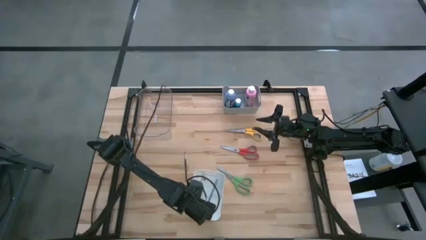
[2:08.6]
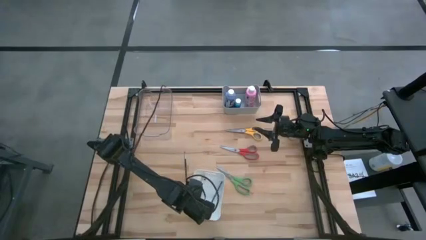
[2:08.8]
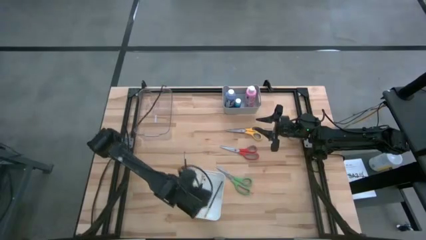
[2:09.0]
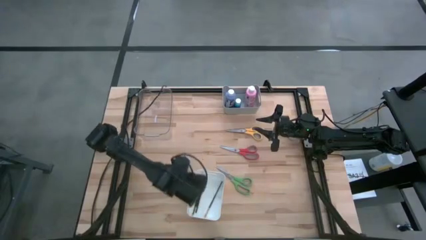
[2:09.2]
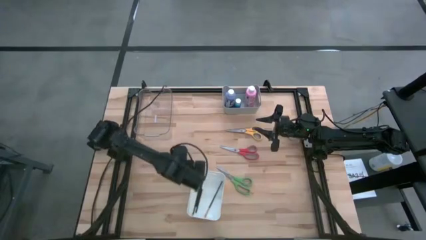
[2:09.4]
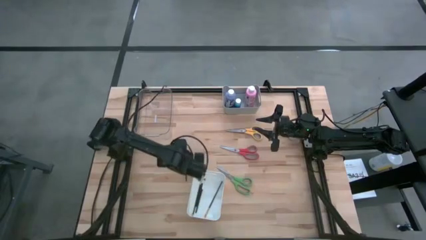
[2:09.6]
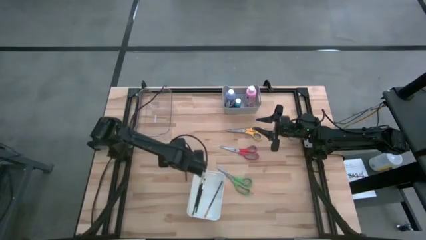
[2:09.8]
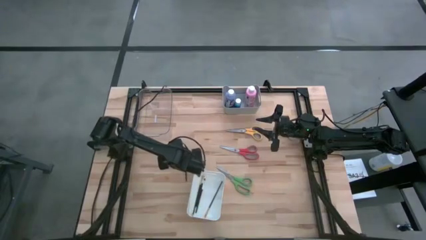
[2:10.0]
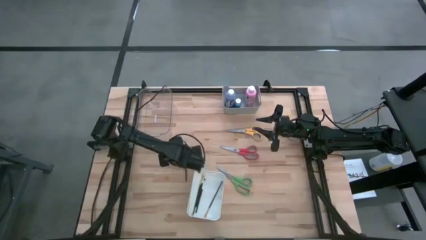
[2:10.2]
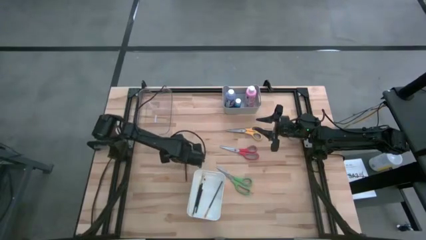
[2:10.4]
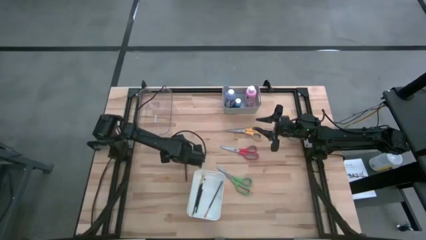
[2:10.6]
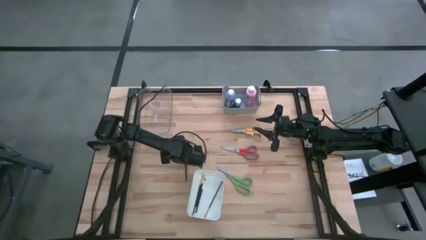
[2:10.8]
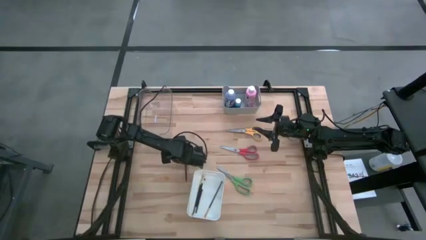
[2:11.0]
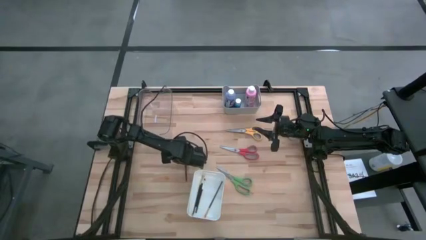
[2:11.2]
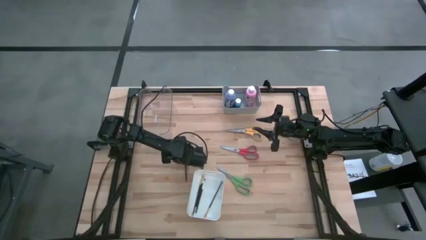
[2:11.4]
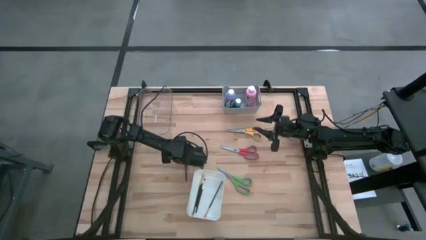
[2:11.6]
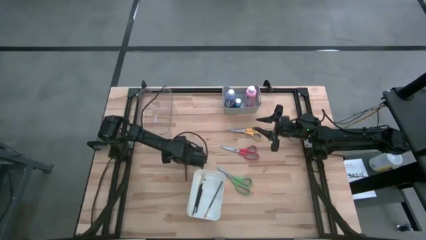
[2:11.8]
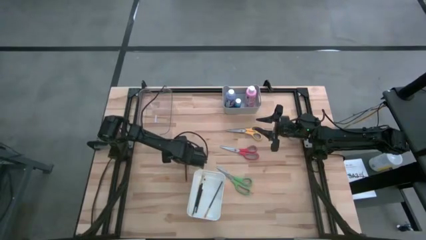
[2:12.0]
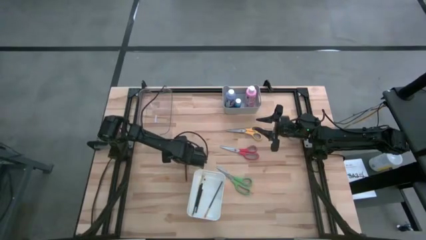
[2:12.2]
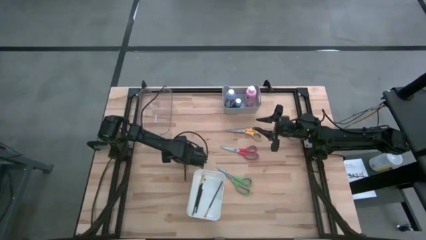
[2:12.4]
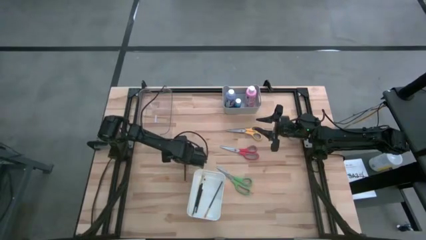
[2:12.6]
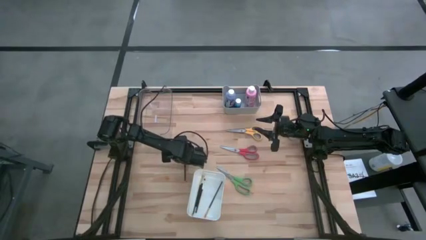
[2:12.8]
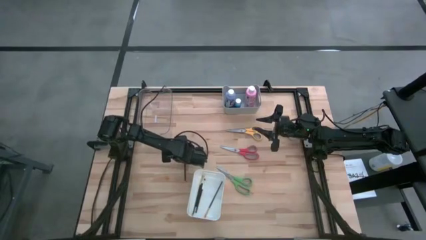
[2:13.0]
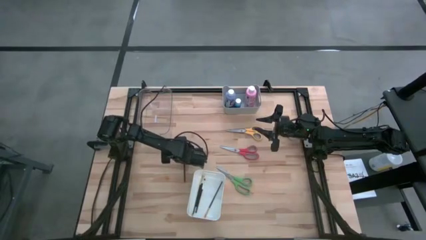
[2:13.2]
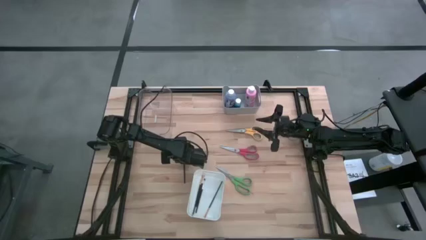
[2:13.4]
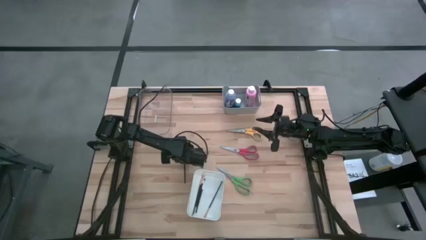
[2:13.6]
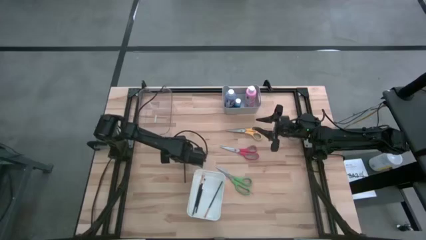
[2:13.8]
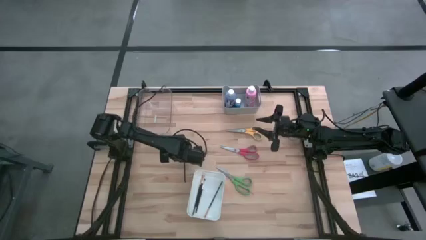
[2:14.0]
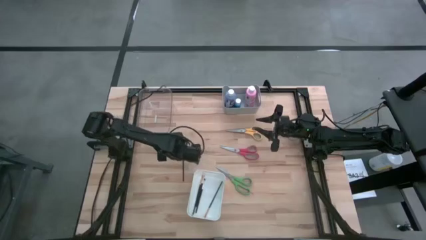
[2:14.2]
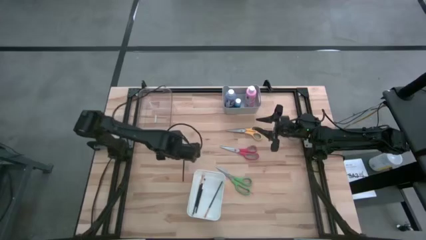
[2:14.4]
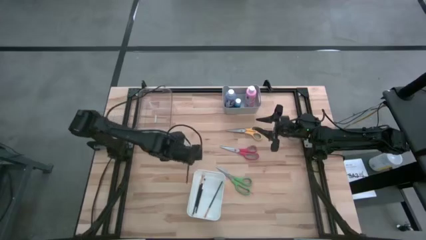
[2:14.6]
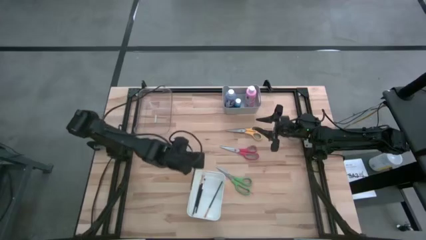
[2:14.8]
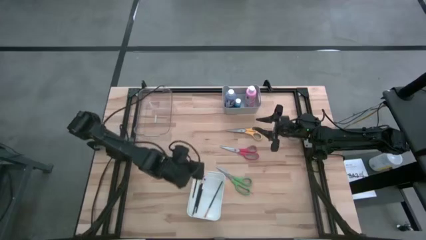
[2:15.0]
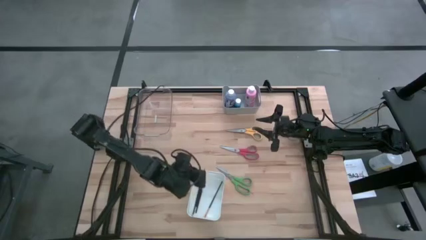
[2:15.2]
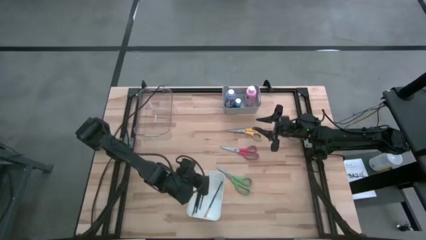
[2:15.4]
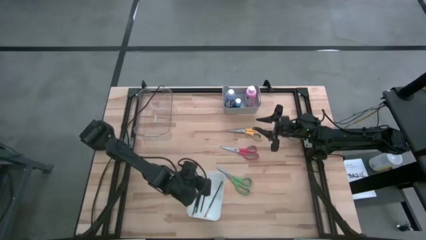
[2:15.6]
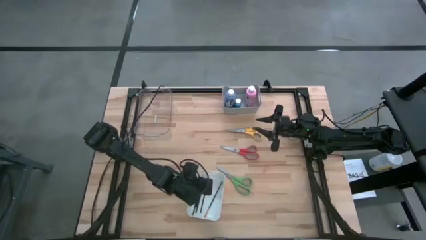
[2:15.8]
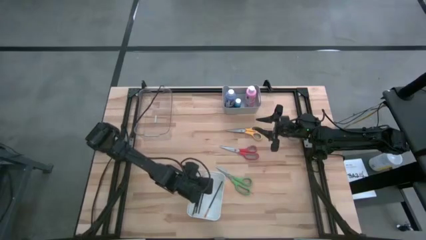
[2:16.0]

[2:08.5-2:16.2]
Task: Pick & Place Paint Supplies
Put the silver eyeshadow brush into the white bin

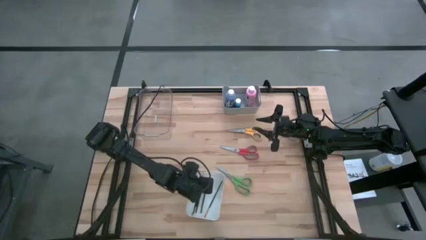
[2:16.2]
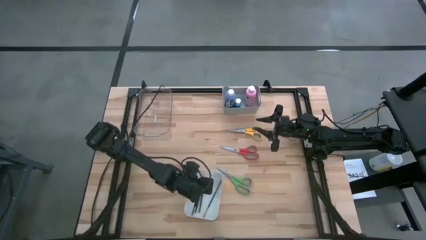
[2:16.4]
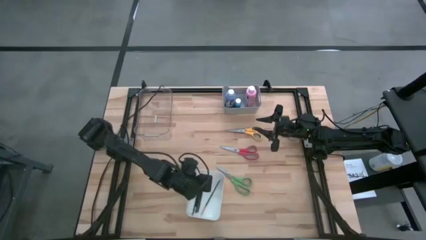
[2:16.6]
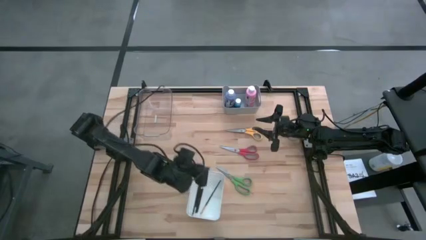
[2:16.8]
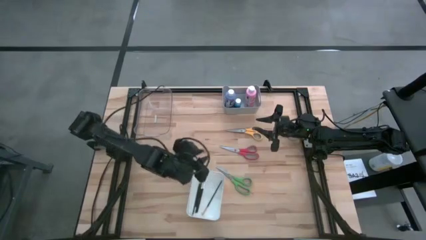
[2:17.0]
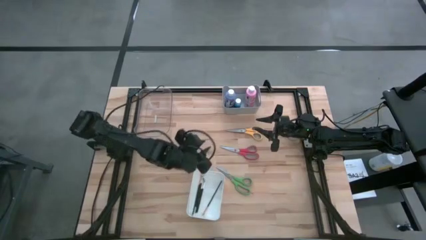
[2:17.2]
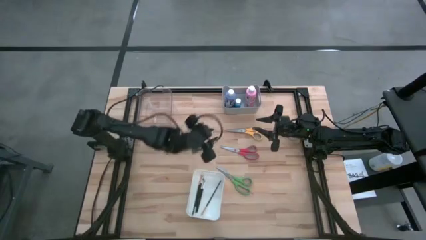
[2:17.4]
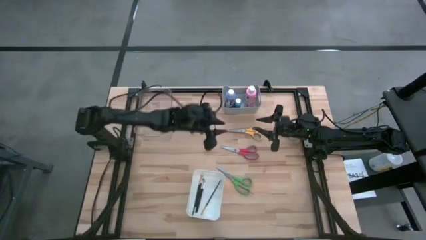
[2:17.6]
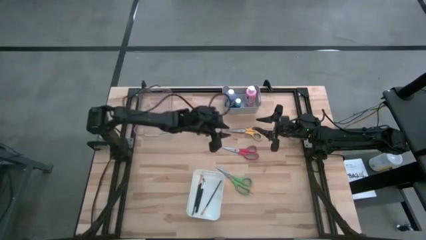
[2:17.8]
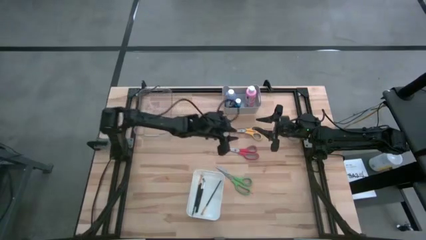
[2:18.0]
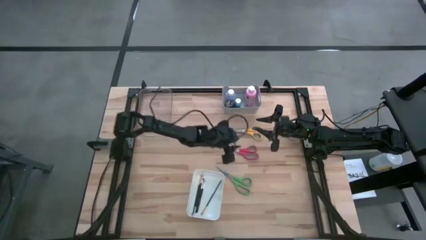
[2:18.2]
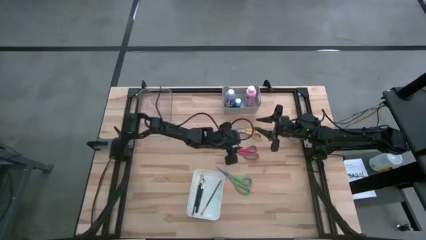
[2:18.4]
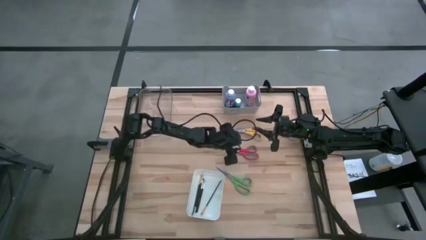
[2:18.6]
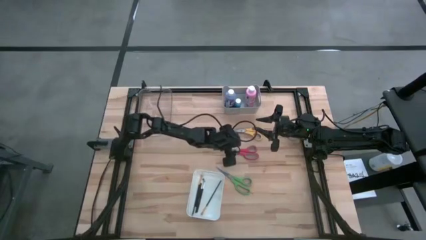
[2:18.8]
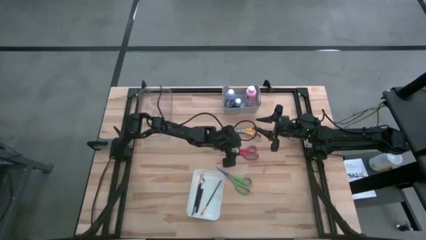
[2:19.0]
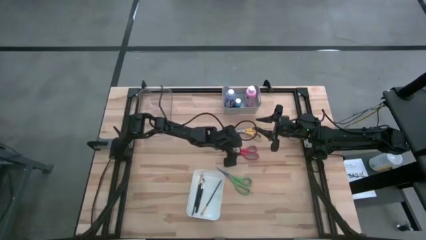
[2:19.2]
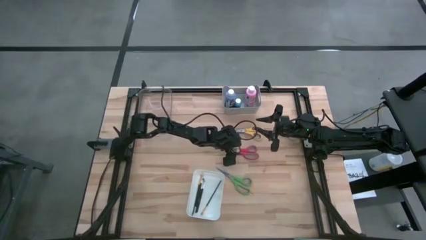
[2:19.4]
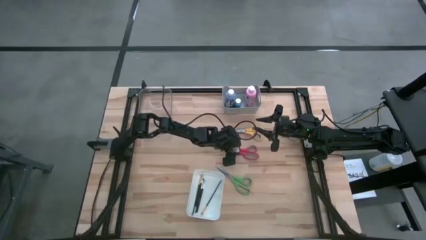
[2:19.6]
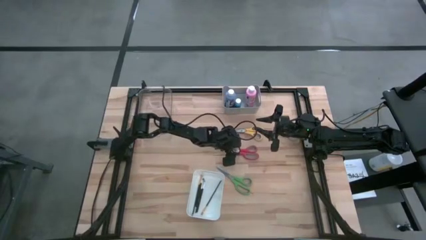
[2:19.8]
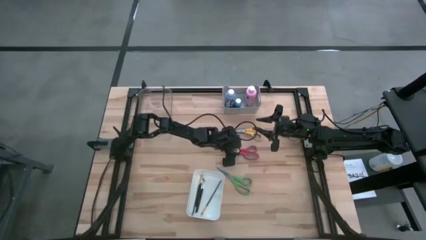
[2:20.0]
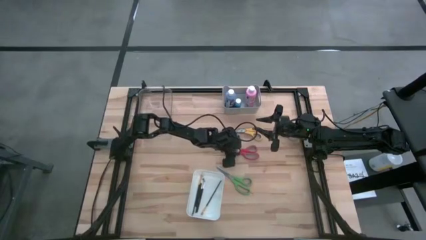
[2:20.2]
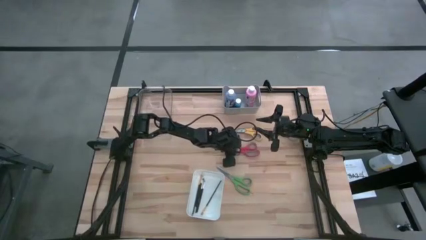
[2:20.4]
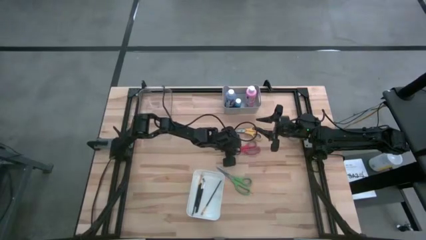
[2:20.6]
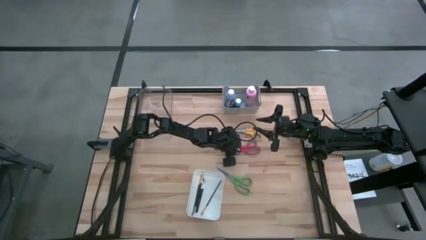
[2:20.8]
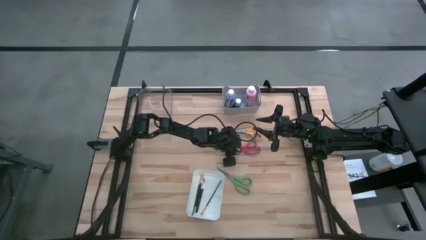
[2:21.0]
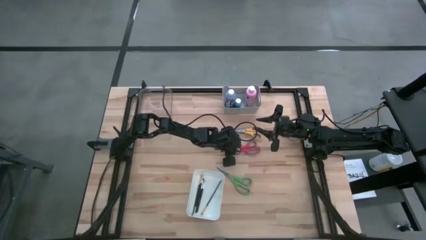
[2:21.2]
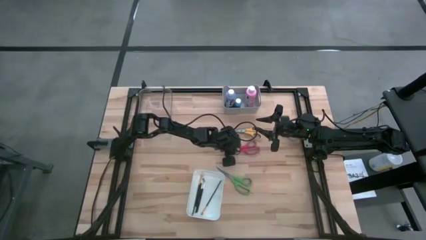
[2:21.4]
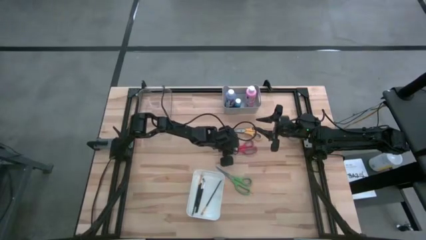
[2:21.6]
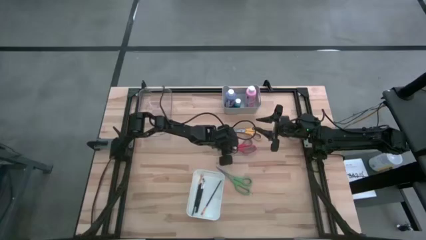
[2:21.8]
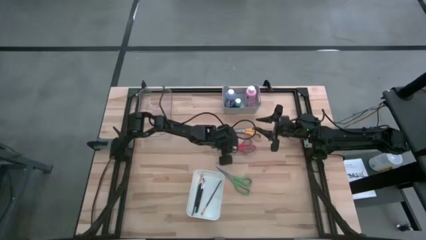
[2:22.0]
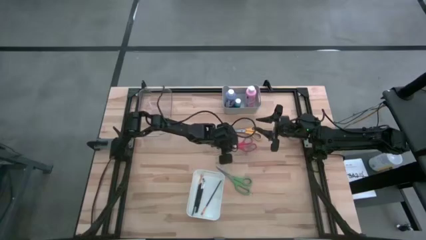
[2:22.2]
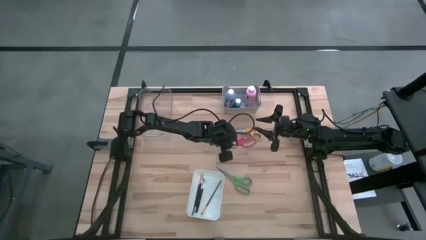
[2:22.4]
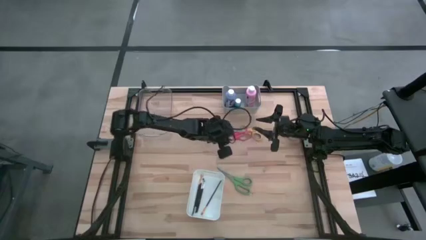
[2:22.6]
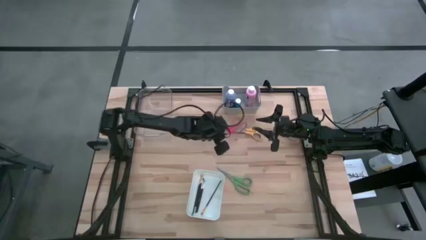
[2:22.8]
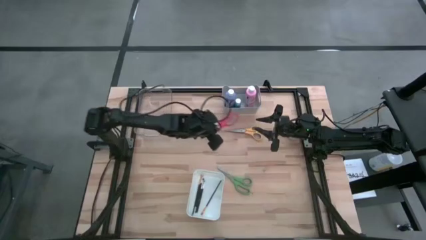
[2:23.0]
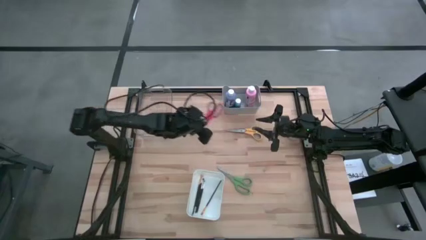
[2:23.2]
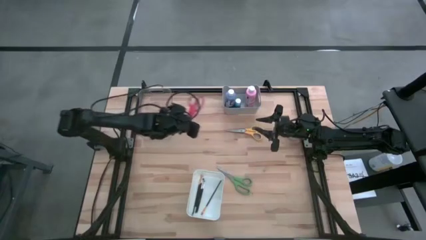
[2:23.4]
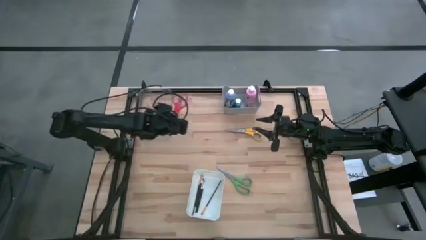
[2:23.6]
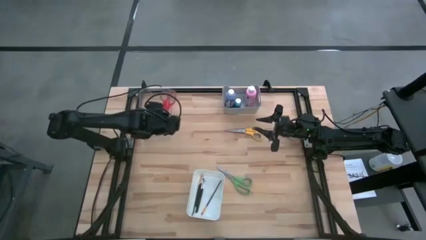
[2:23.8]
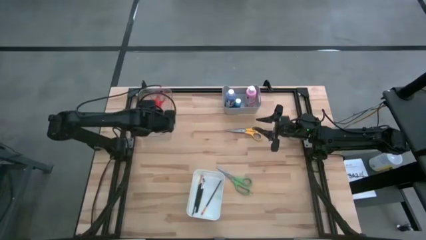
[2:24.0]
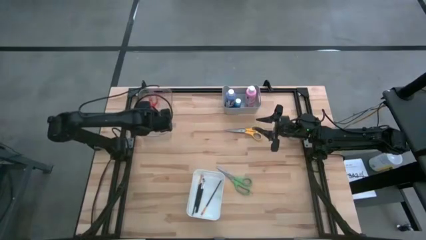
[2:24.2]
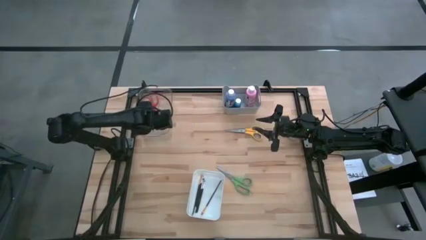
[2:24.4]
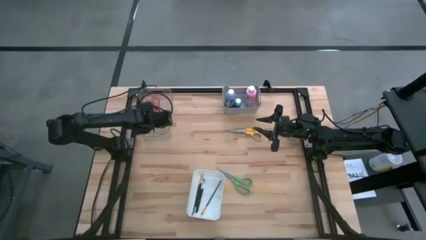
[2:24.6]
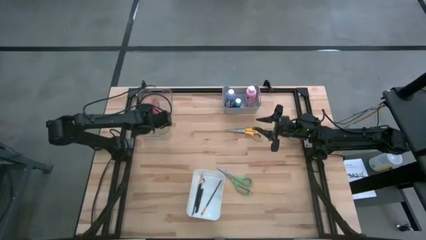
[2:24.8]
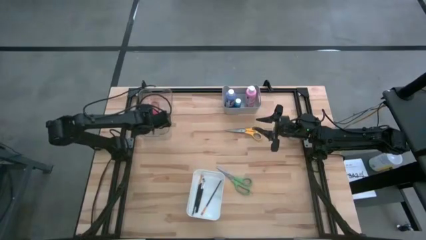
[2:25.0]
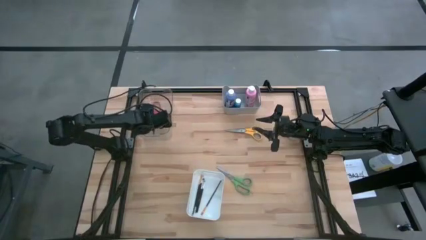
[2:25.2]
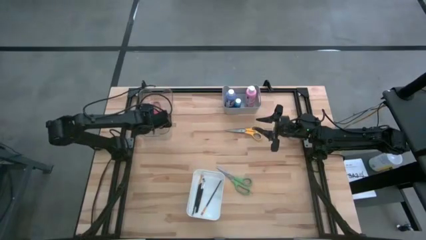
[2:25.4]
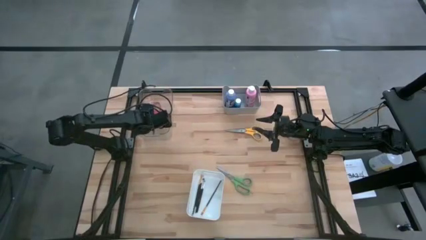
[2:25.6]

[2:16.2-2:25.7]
Put the red scissor into the transparent bin
